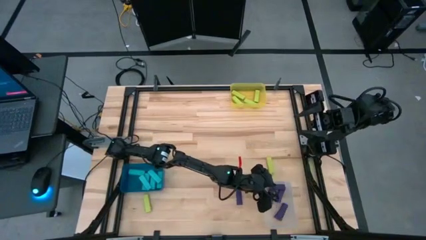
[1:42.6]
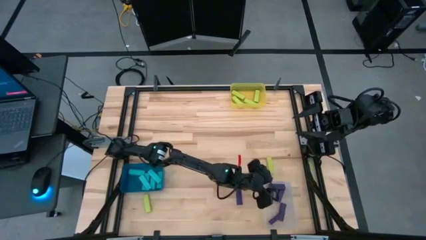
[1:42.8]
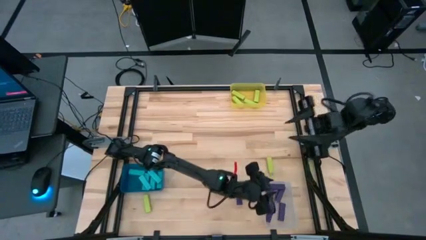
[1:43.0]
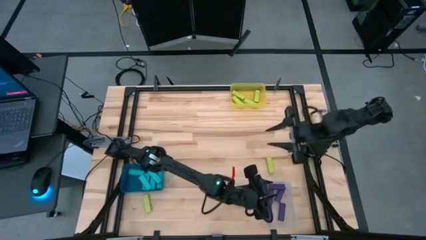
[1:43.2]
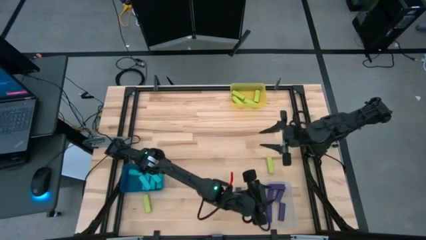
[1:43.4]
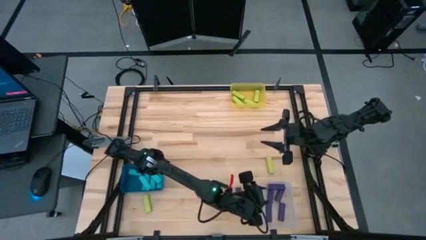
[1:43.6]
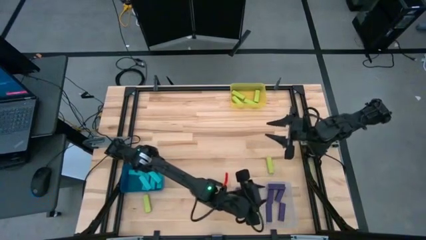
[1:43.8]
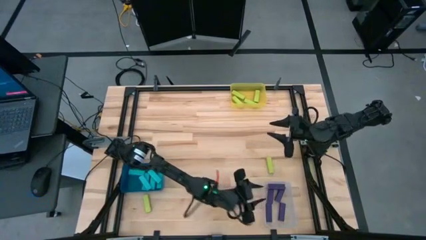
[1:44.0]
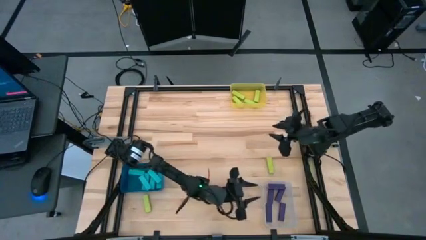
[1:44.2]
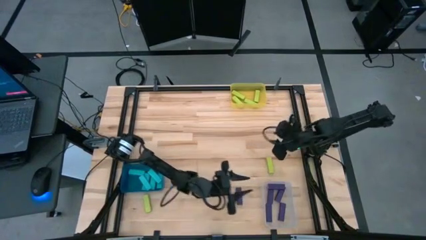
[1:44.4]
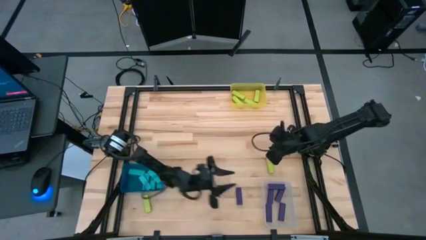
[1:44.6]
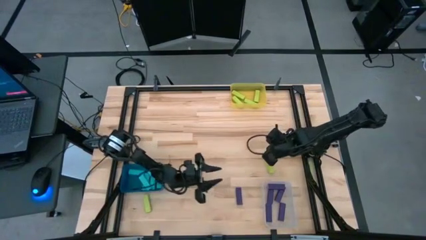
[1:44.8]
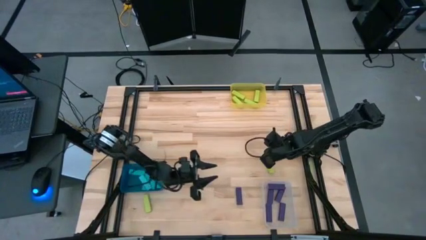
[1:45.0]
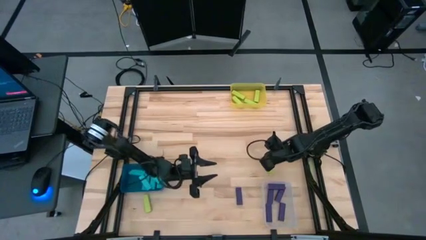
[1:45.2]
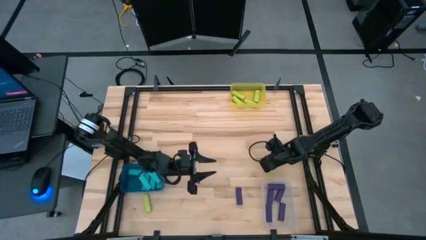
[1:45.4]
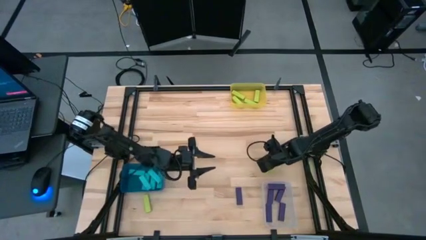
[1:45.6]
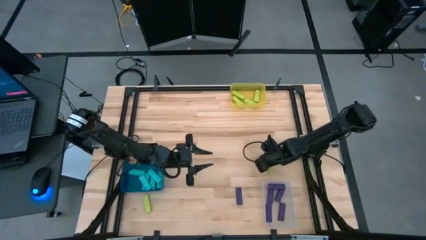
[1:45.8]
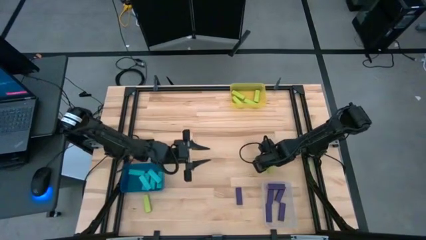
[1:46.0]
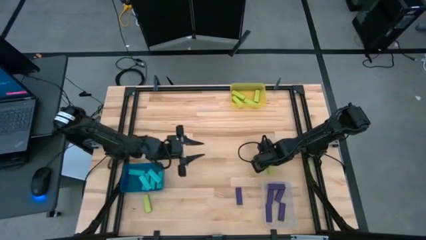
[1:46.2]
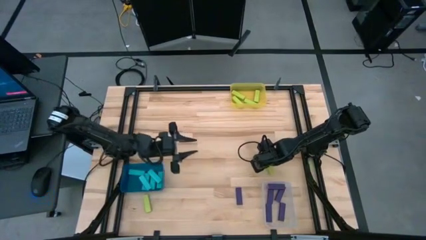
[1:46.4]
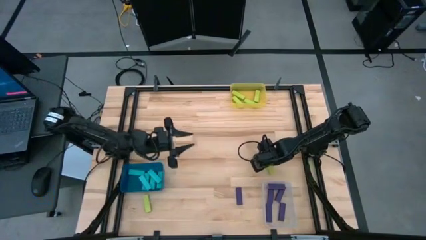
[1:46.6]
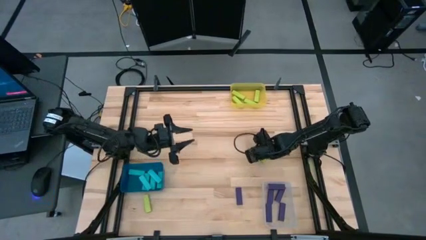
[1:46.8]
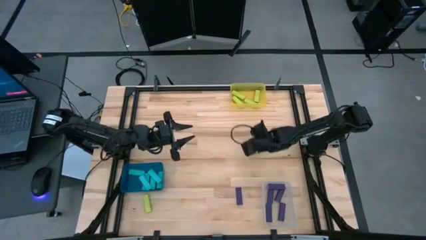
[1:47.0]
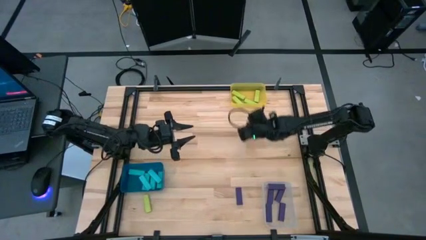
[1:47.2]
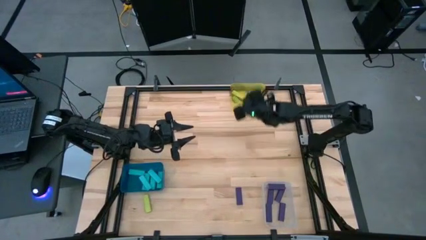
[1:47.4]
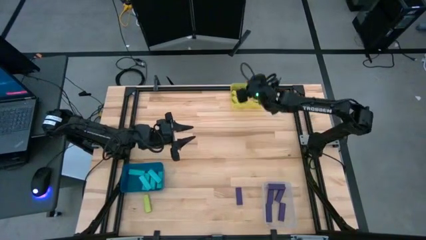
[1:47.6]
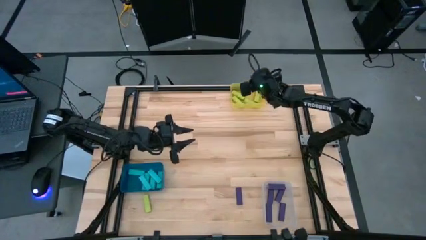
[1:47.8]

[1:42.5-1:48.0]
Task: Sort blocks
Put the top green block into the yellow bin

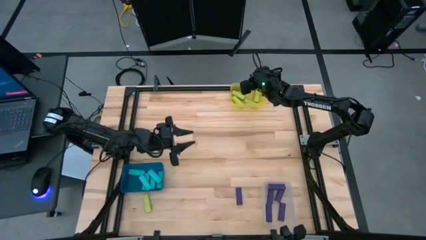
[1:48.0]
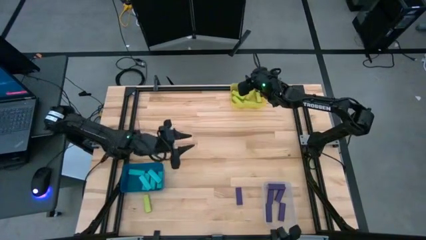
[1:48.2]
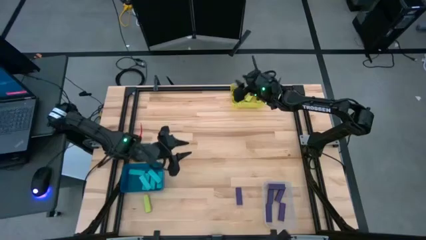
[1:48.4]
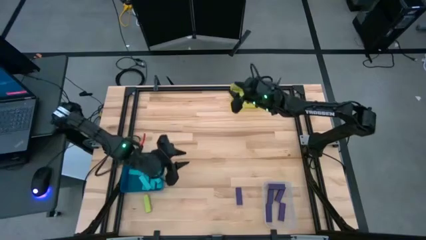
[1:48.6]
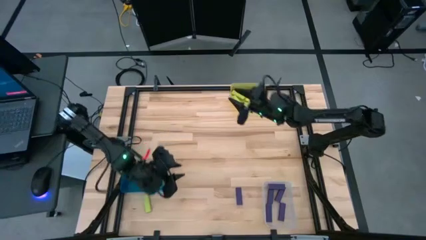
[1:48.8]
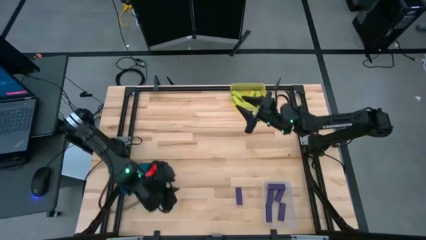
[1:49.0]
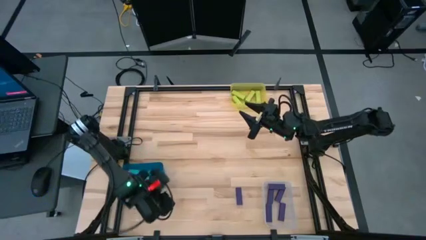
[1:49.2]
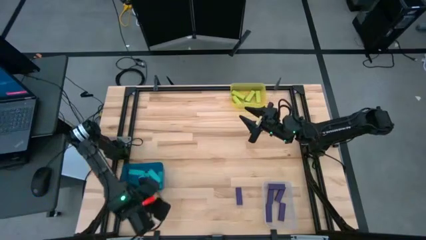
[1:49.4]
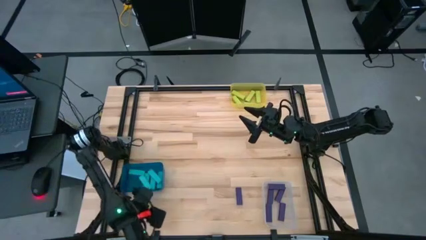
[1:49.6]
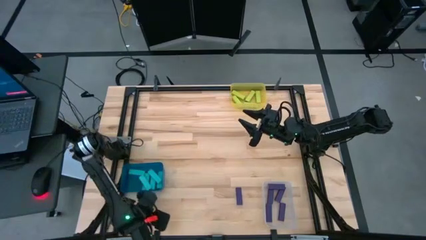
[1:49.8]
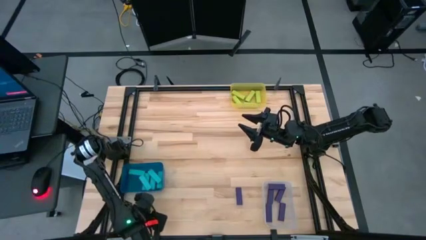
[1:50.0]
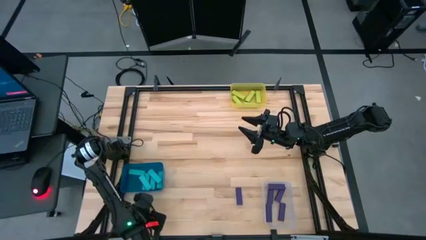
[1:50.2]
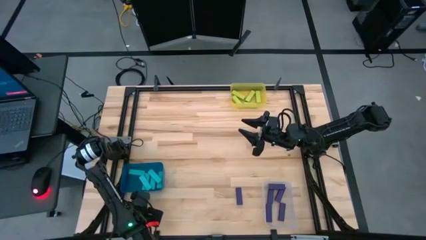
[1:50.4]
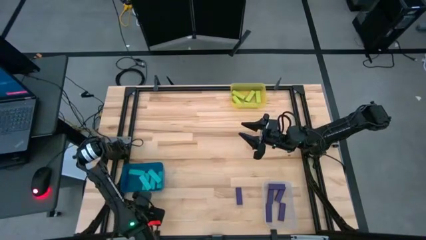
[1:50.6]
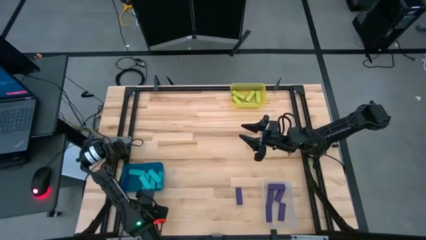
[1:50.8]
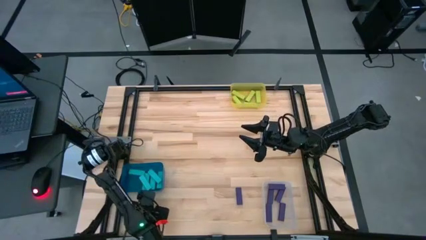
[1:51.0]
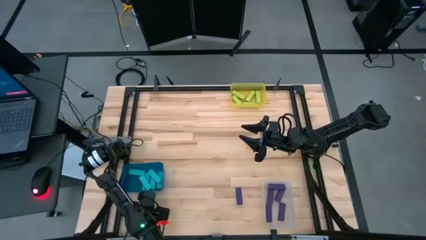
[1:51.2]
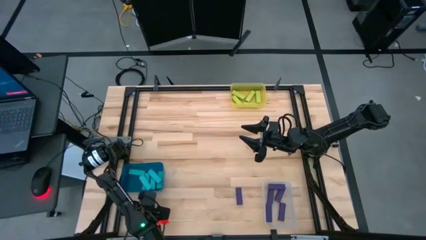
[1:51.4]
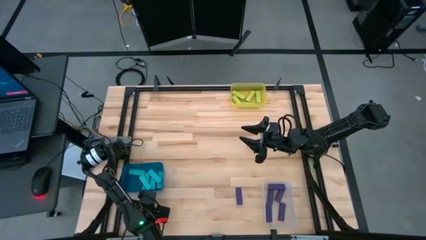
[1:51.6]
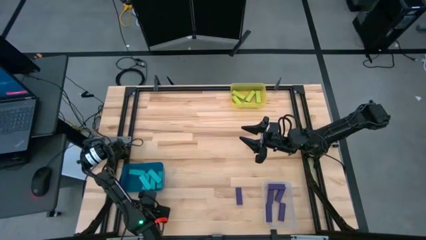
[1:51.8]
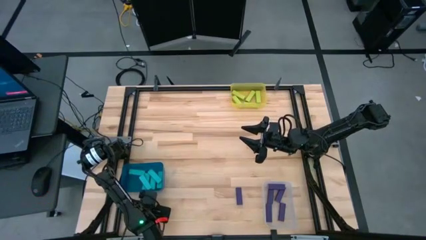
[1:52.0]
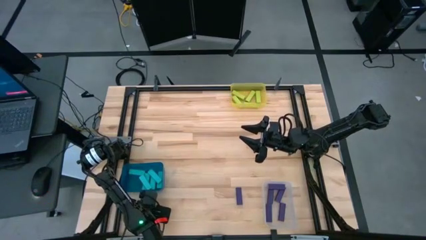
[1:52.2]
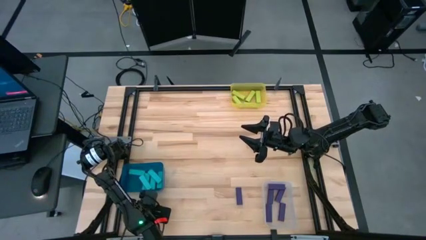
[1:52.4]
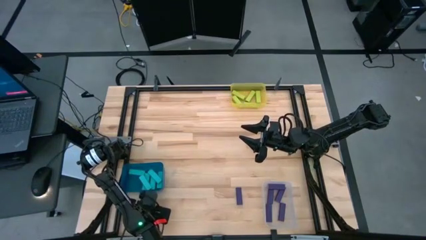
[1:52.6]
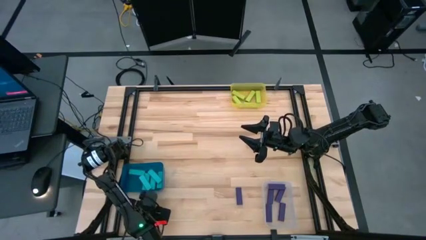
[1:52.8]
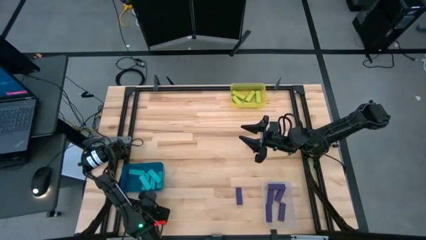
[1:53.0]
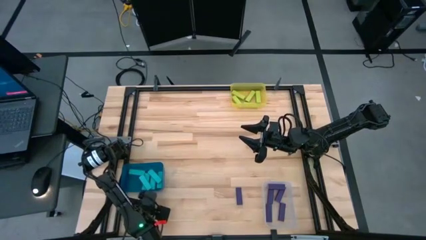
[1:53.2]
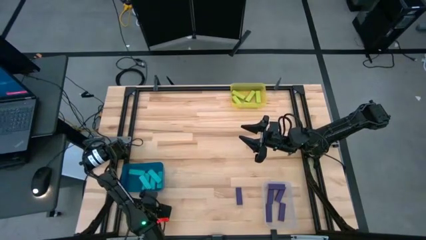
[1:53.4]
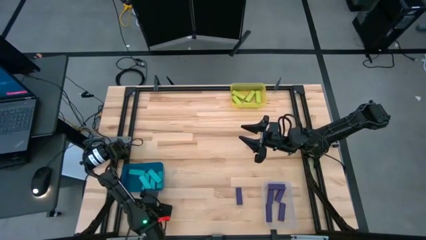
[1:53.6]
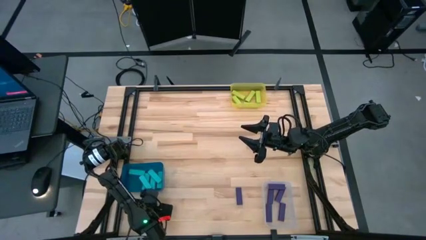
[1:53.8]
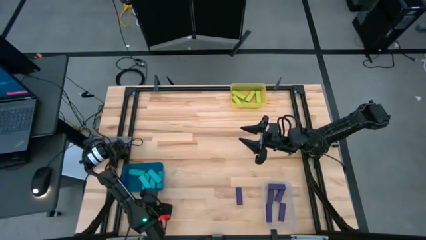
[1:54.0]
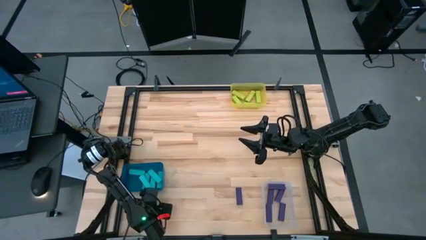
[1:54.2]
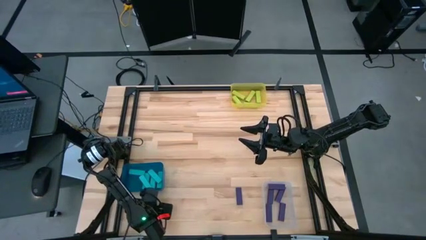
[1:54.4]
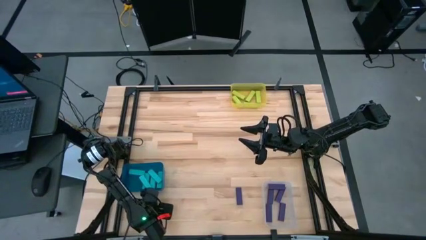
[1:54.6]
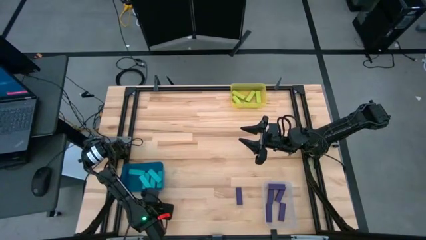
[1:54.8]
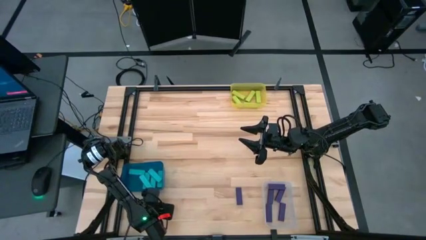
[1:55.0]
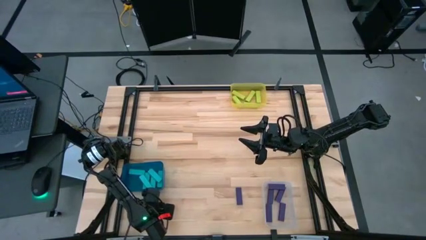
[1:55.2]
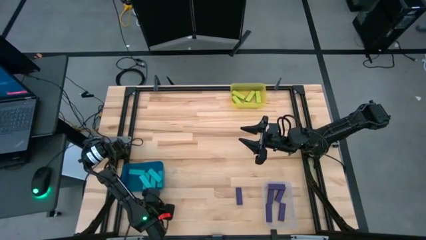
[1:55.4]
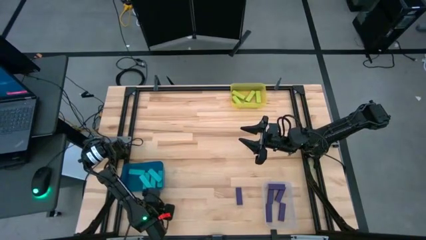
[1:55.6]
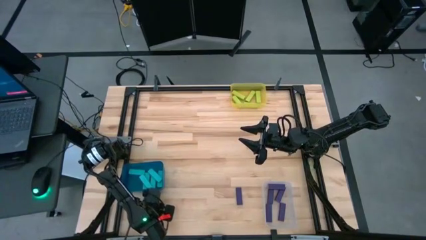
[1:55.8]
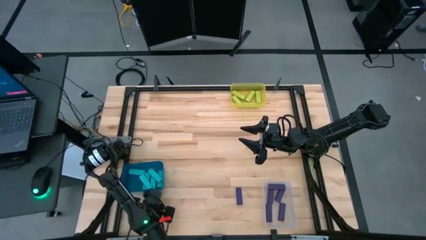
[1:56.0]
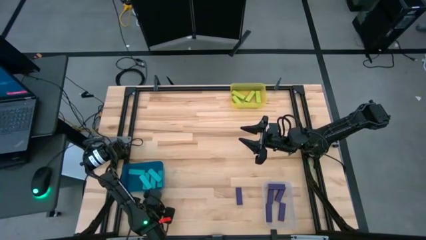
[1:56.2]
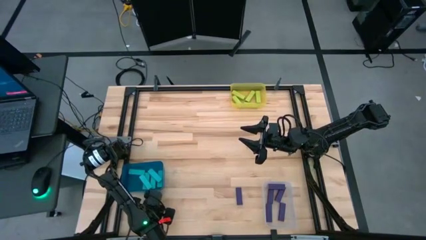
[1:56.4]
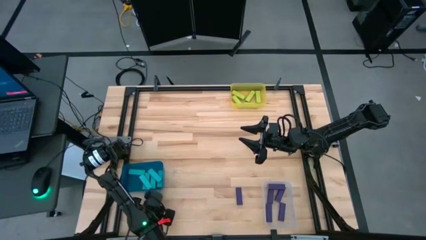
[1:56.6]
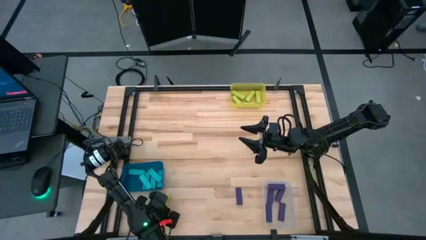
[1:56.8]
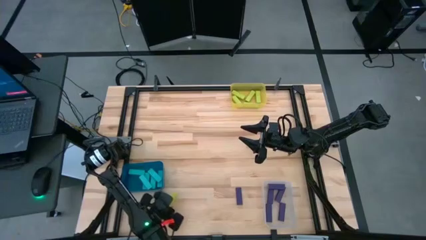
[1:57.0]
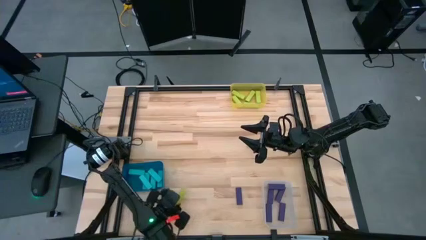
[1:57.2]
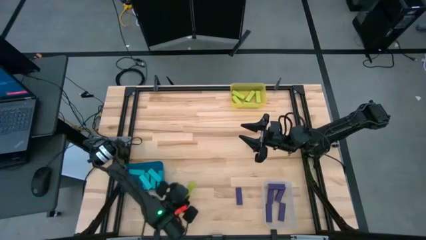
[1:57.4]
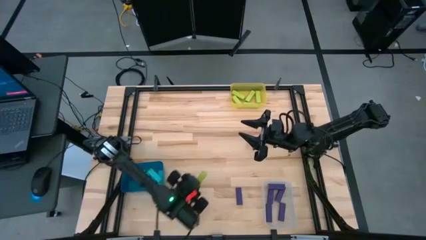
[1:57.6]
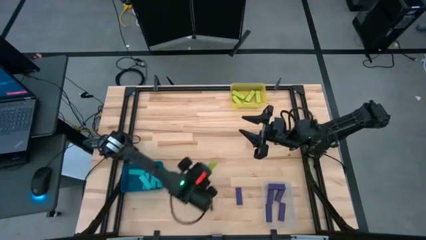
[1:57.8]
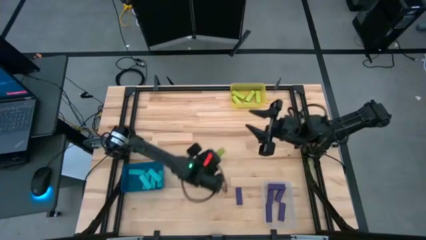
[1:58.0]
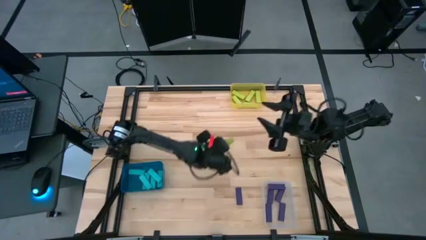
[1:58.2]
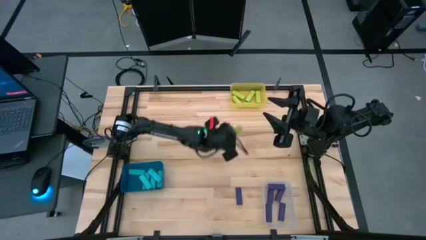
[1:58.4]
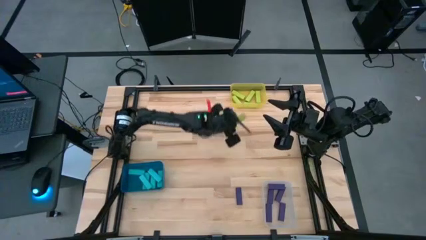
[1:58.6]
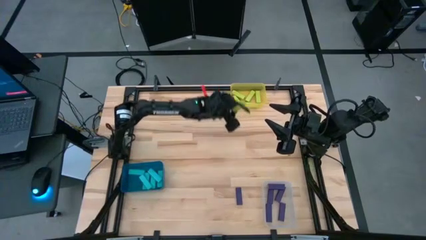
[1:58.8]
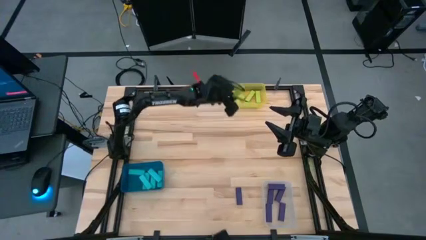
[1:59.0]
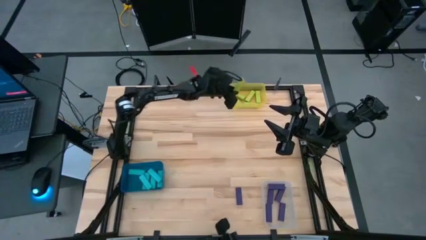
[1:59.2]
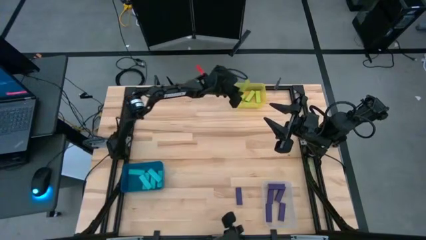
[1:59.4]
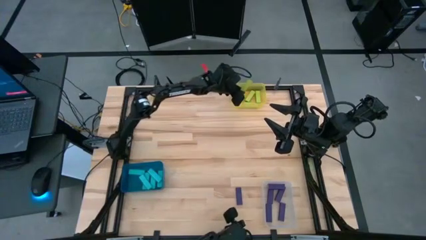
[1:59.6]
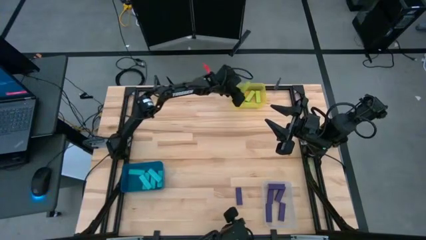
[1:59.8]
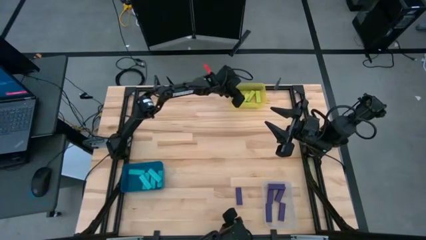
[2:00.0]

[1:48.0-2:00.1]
Put the green block into the yellow bin
